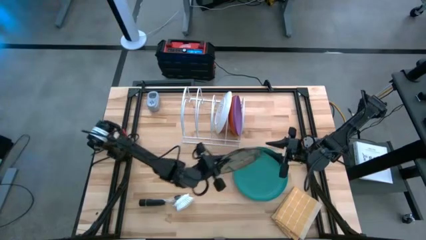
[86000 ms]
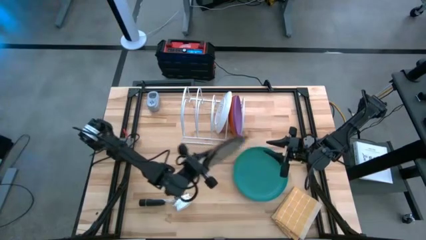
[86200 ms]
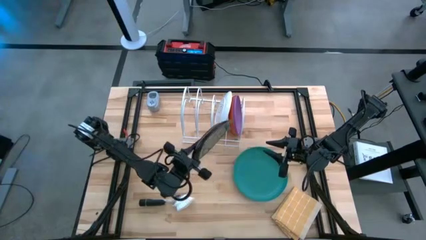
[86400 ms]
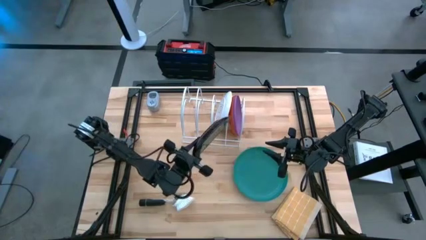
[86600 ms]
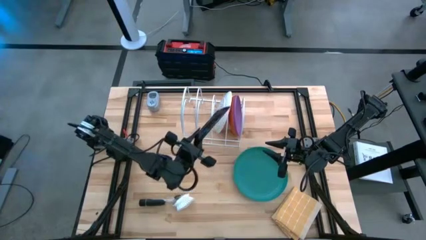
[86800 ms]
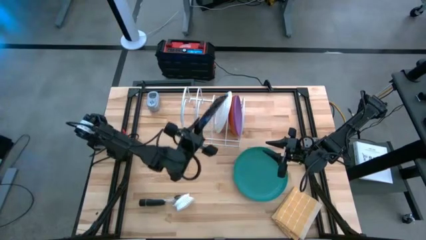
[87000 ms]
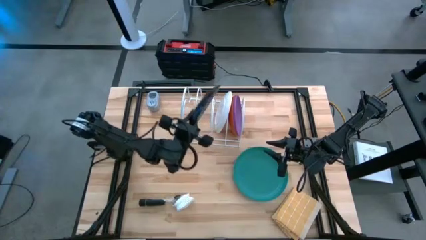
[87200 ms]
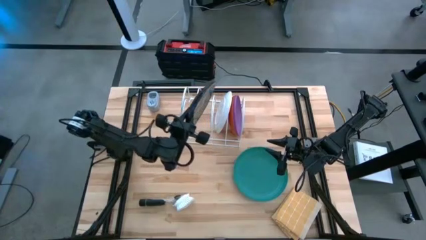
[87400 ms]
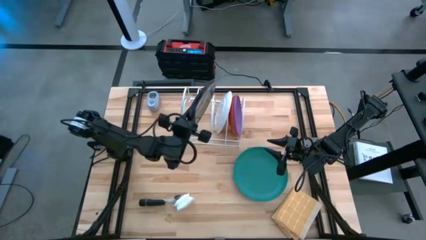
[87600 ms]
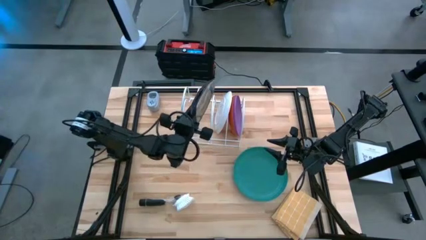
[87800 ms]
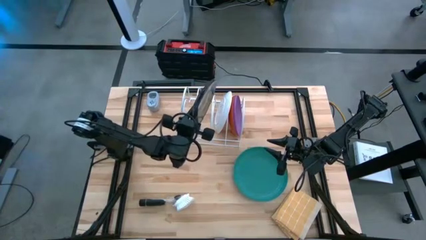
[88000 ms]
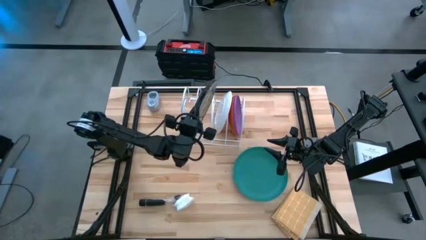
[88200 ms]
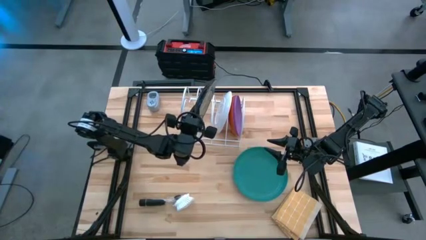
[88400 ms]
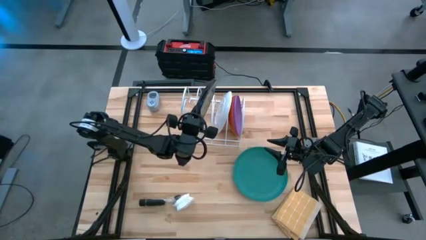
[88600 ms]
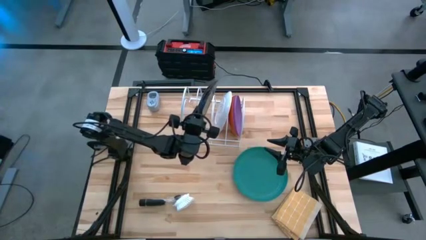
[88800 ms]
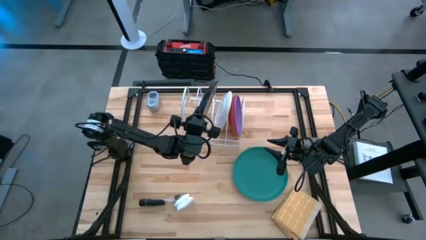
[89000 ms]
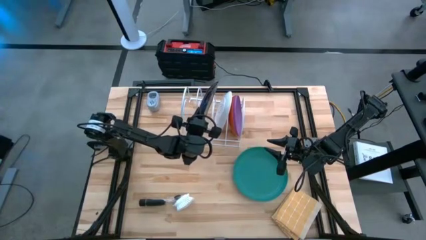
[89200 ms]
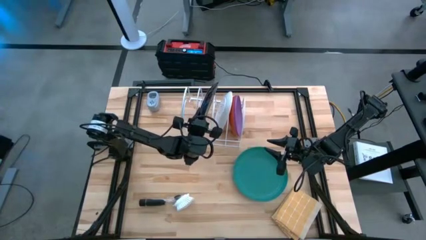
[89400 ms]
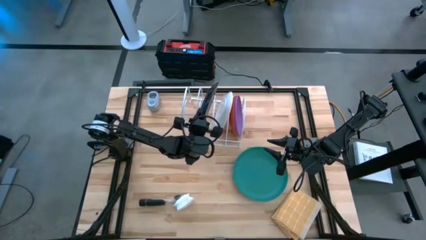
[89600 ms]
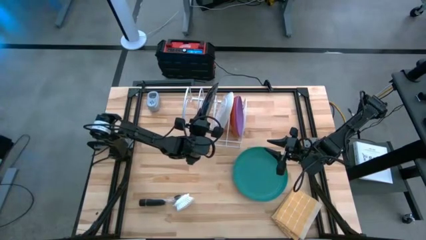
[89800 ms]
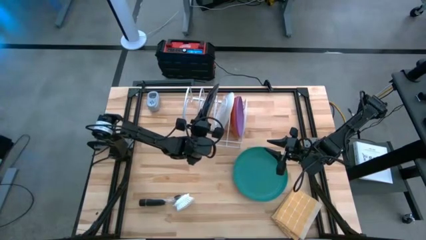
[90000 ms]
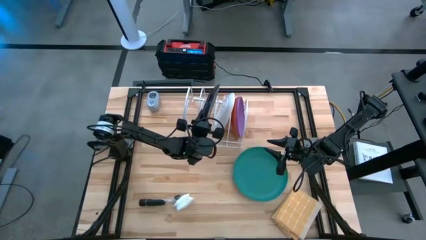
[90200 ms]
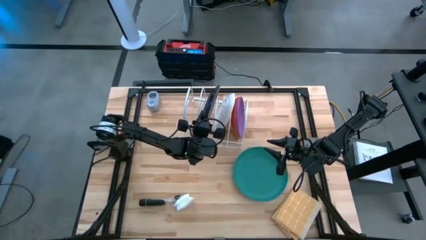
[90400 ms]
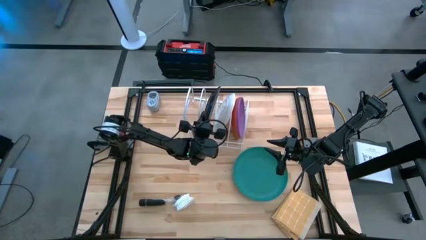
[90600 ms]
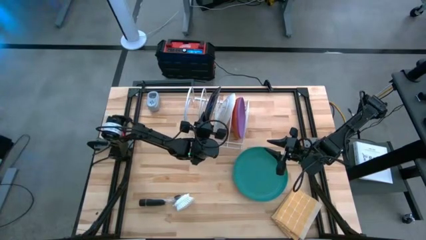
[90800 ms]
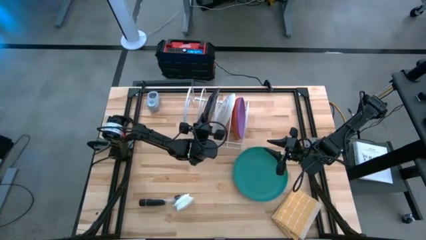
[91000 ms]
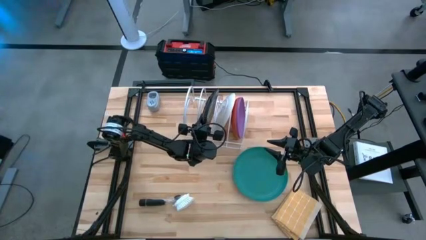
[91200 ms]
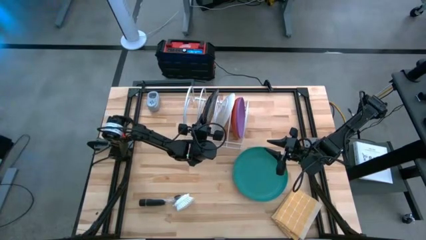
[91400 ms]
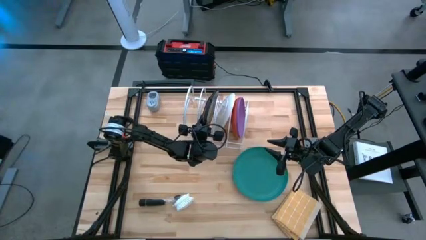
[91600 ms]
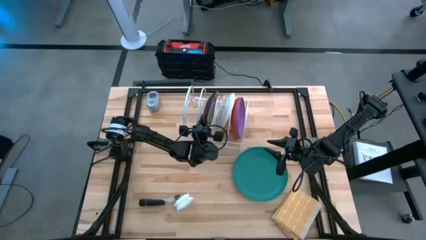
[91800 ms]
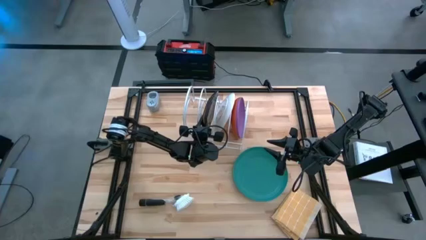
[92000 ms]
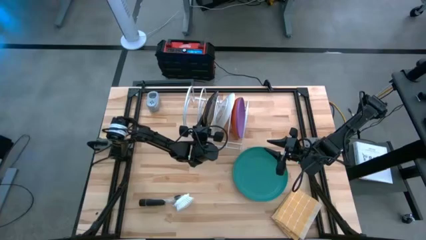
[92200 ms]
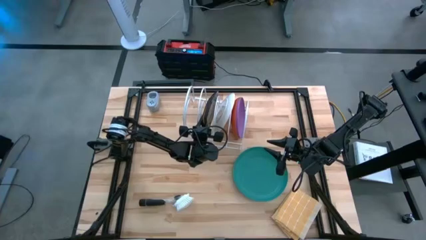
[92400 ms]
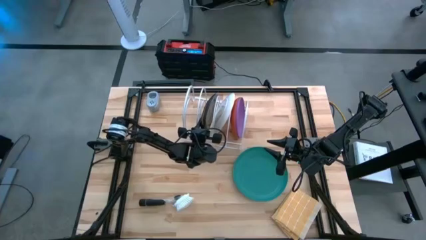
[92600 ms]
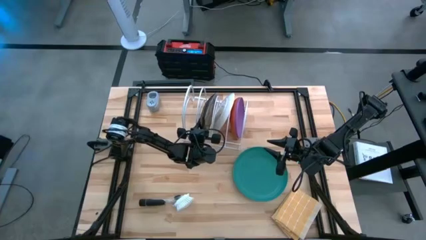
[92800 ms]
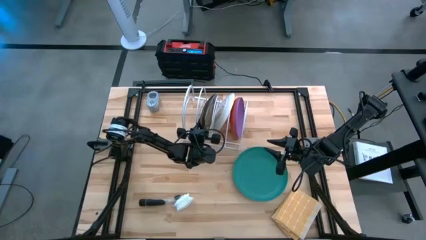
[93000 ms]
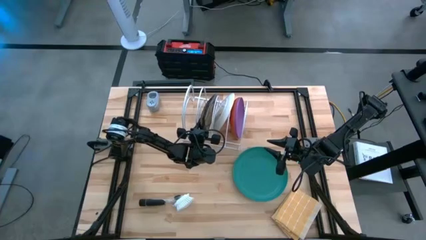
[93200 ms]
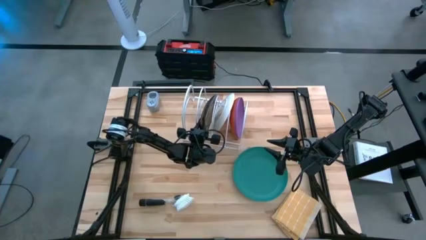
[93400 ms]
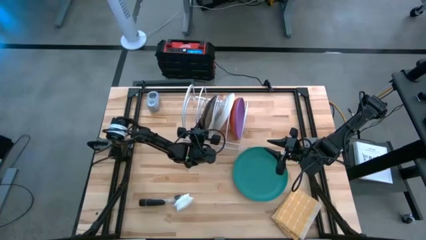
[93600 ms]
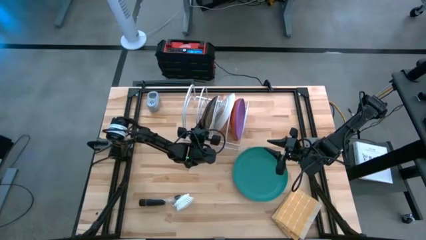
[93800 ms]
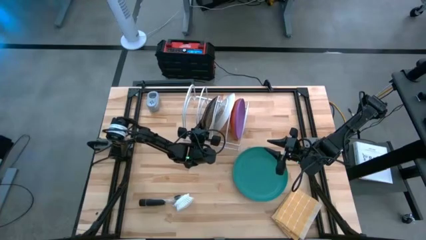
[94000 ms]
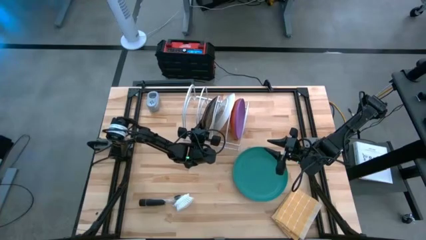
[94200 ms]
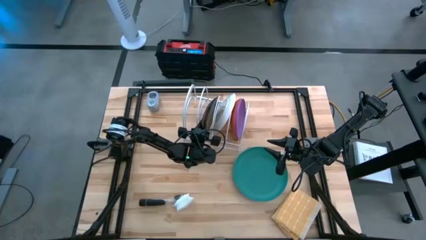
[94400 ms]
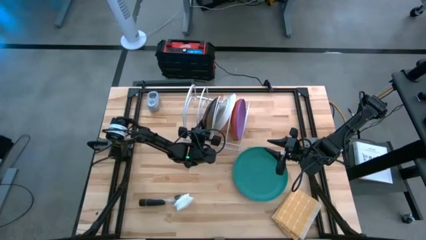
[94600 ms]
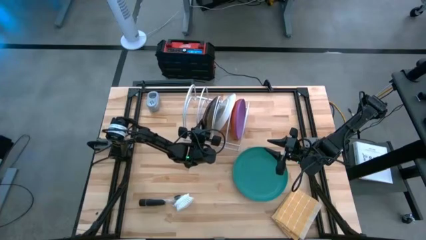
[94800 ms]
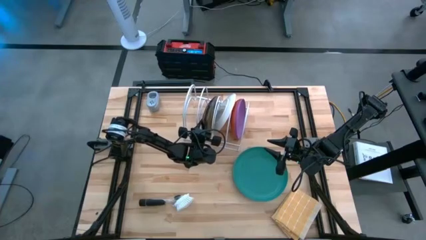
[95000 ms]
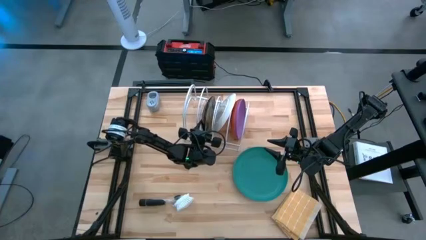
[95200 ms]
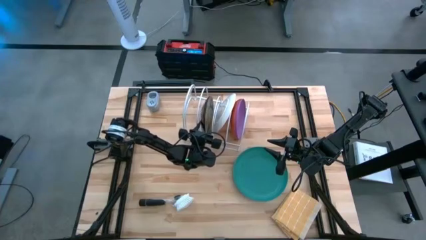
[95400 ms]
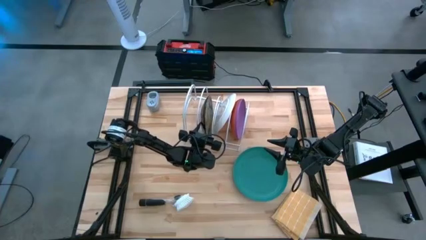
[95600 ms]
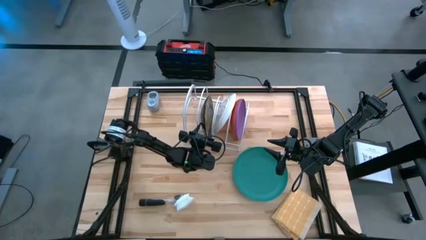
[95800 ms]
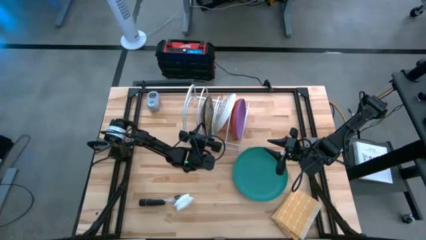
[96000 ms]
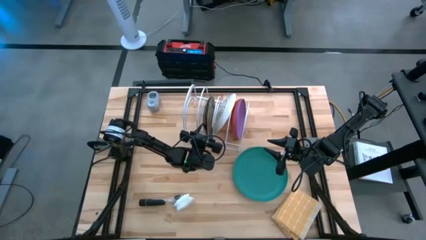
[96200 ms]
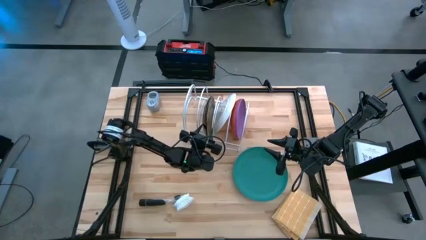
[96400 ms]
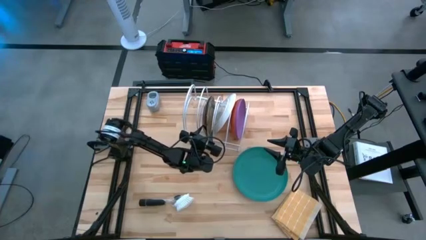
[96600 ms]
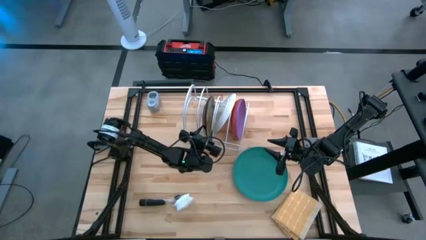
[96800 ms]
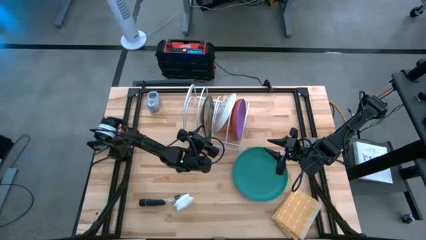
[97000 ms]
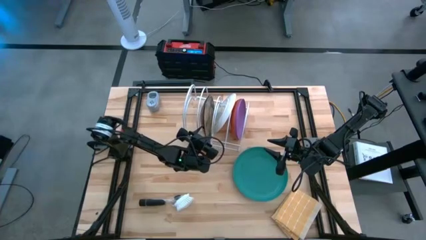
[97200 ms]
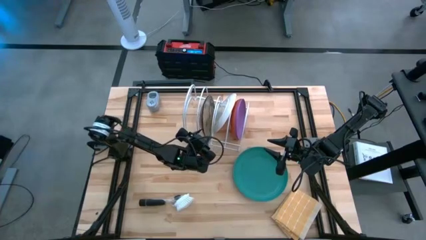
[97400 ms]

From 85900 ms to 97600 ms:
Task: Sort dishes
Put the blue patterned plate into the dish rack

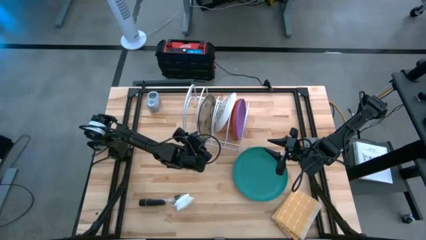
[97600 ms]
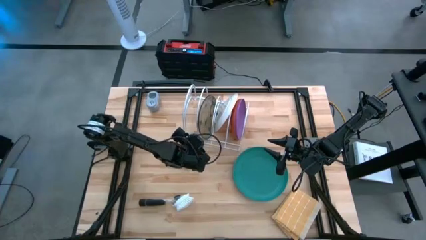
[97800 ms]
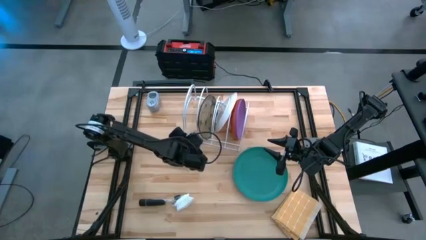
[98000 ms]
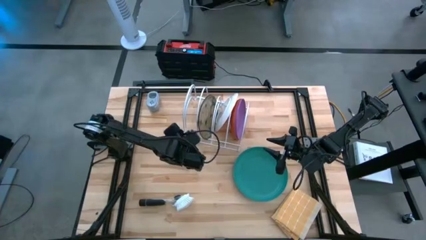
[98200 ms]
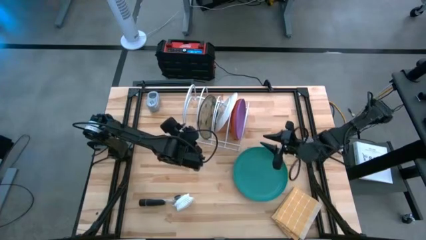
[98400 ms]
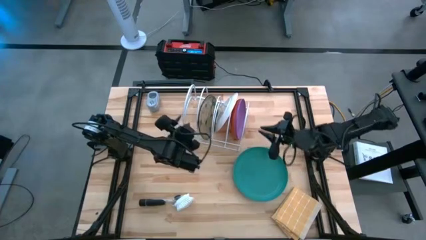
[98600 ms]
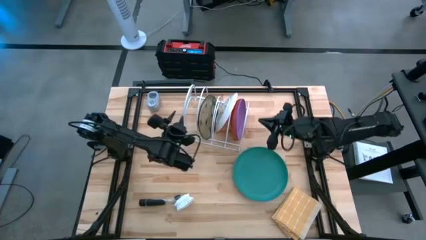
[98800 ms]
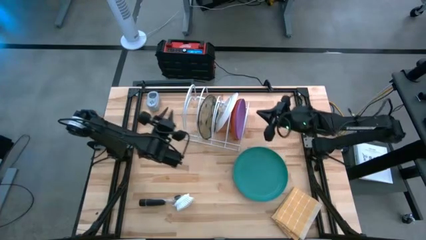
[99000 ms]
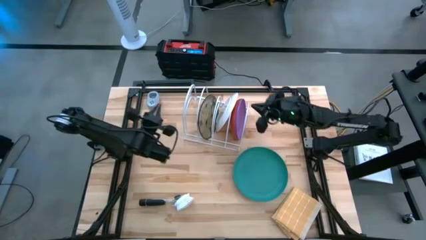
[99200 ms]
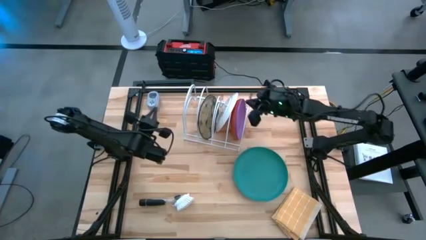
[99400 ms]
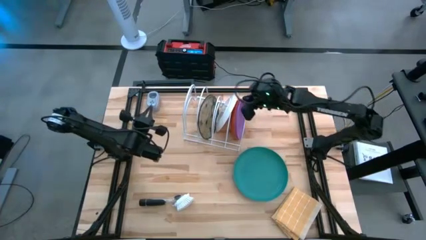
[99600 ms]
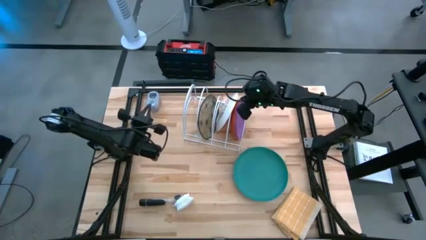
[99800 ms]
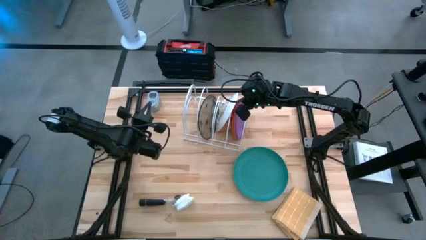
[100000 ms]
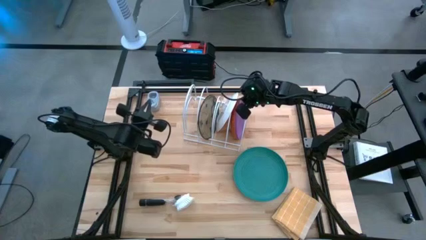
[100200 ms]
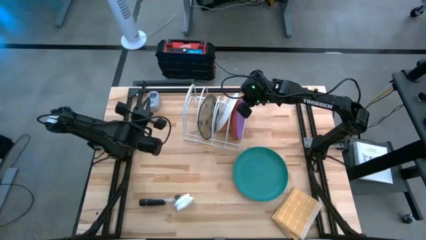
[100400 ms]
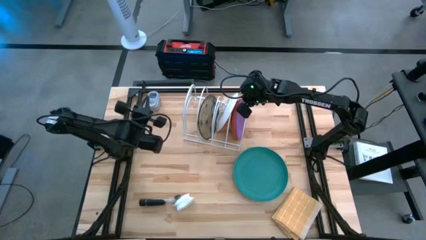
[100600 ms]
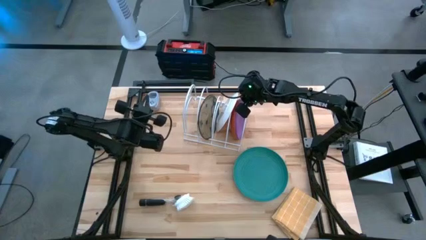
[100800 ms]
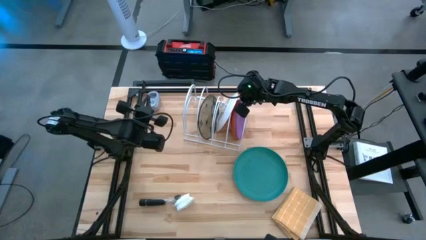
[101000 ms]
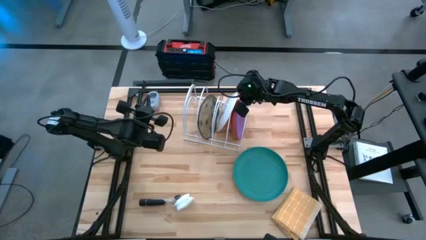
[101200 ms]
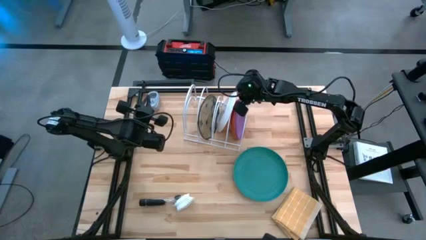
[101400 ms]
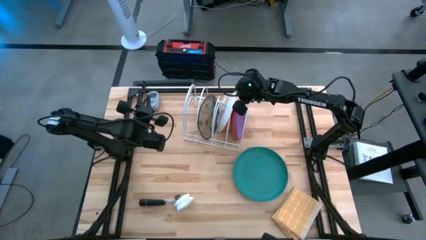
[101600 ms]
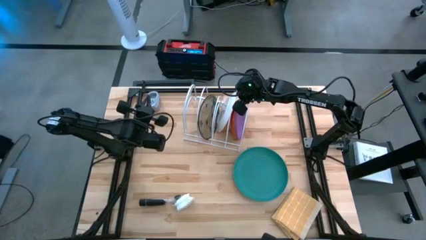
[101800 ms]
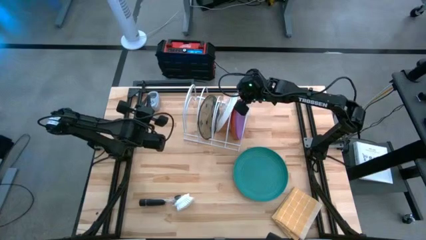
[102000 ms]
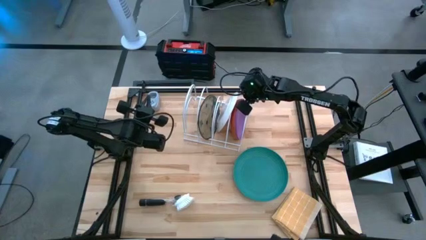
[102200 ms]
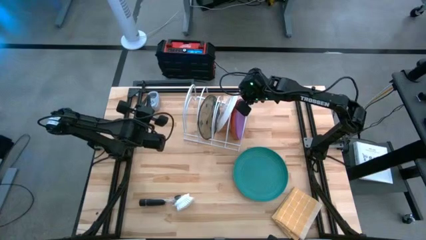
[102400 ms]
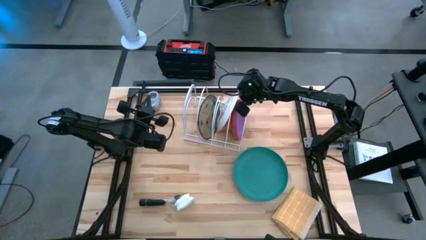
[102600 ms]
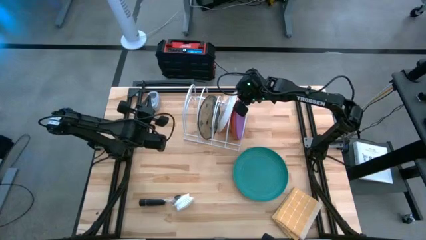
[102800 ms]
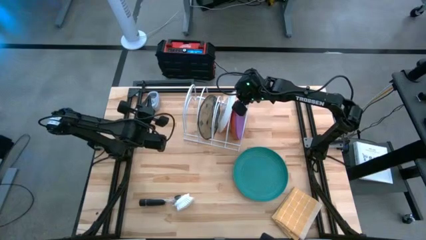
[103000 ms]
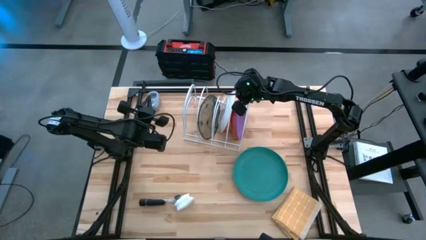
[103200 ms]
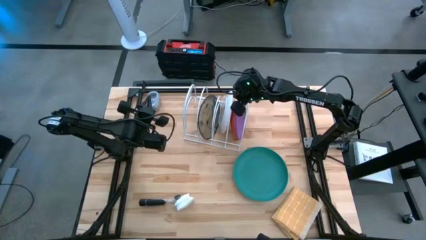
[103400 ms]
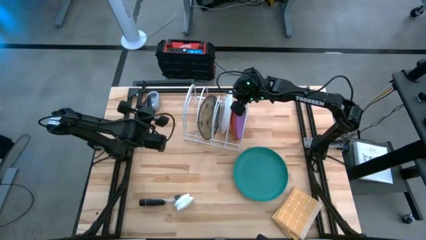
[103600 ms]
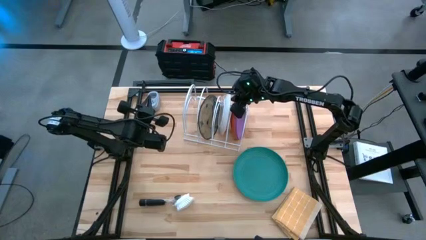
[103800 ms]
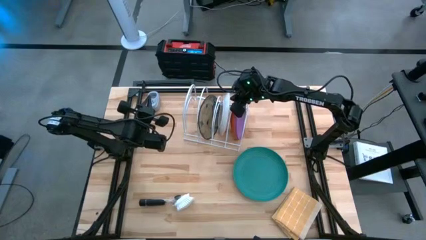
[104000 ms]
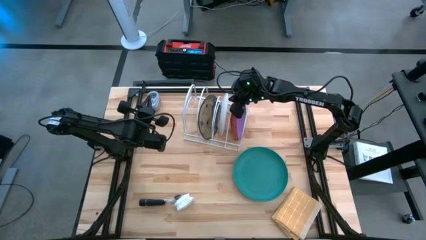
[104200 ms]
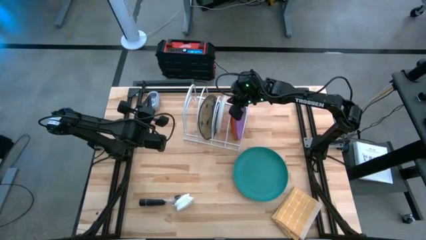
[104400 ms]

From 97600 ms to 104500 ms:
Adjust the orange patterned plate into the dish rack
